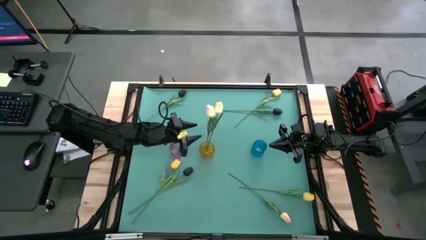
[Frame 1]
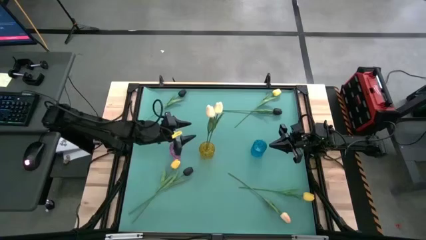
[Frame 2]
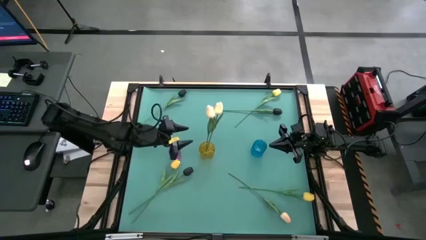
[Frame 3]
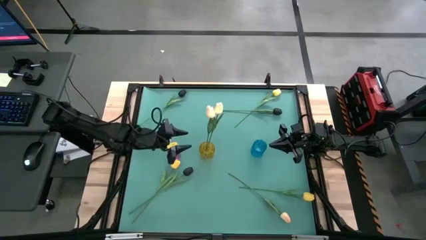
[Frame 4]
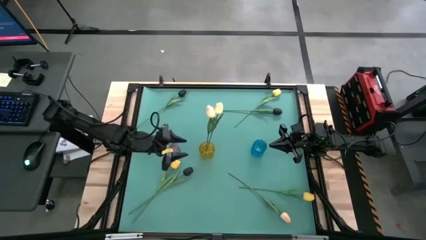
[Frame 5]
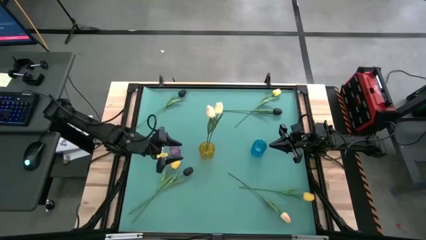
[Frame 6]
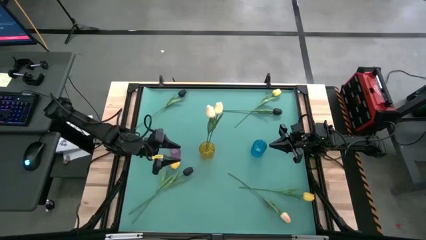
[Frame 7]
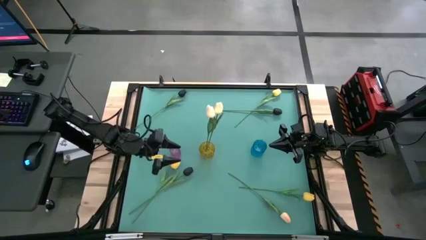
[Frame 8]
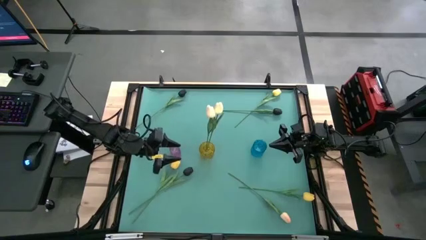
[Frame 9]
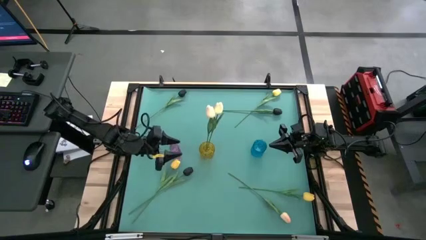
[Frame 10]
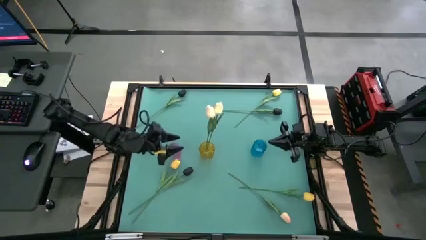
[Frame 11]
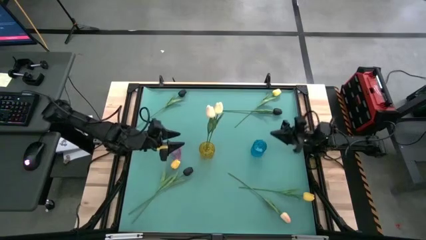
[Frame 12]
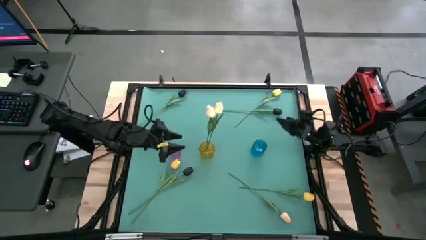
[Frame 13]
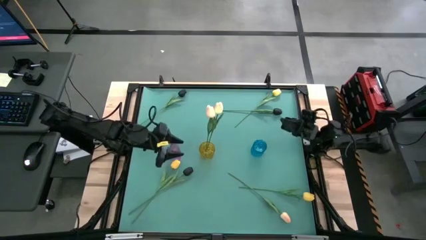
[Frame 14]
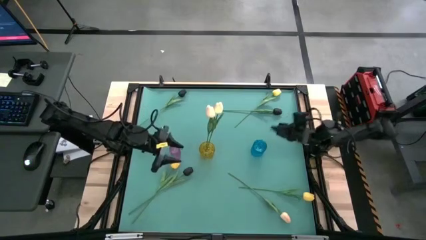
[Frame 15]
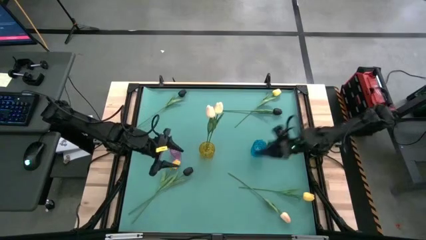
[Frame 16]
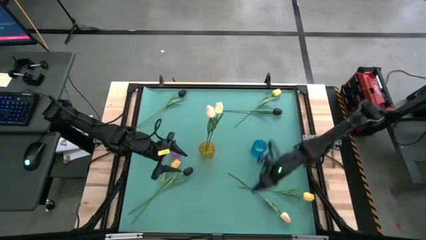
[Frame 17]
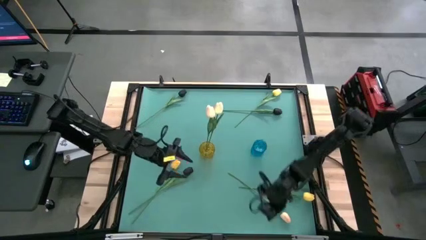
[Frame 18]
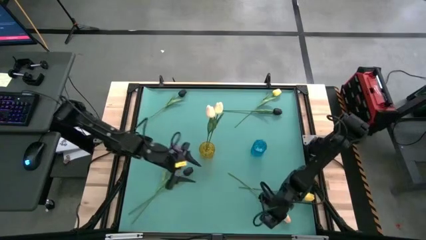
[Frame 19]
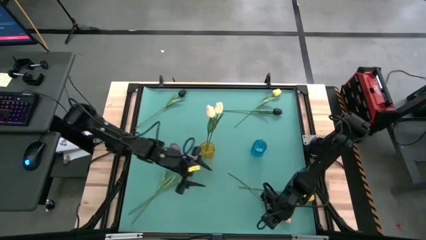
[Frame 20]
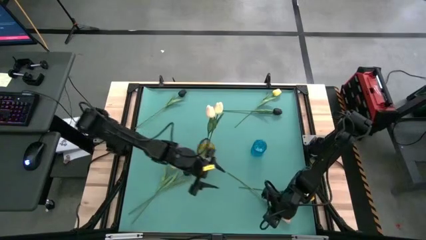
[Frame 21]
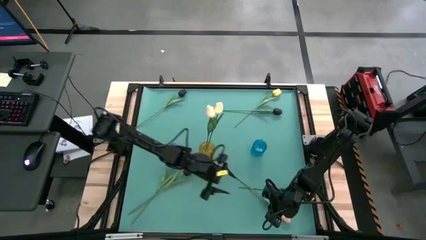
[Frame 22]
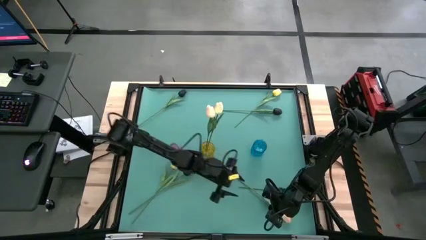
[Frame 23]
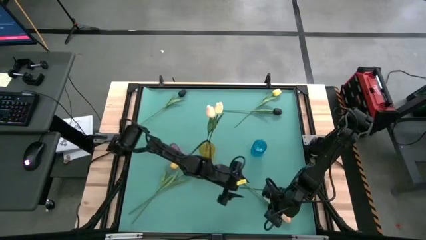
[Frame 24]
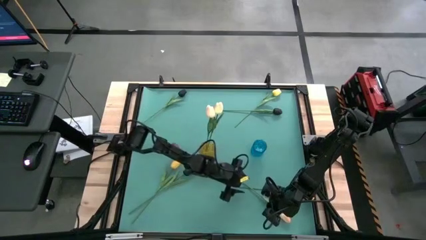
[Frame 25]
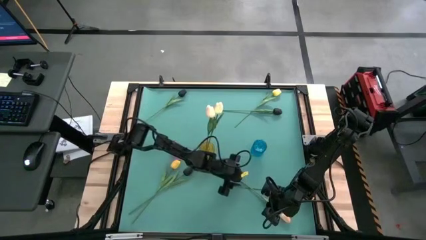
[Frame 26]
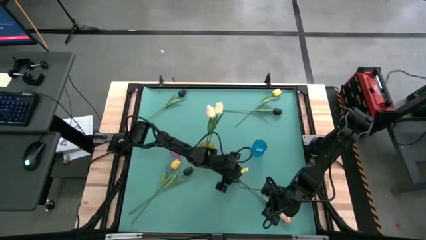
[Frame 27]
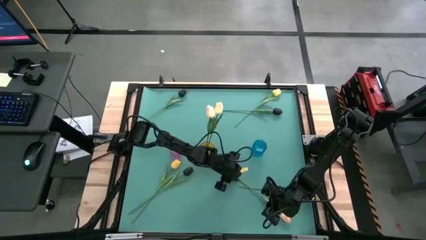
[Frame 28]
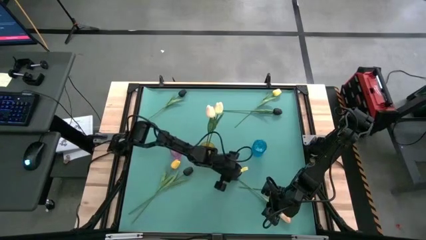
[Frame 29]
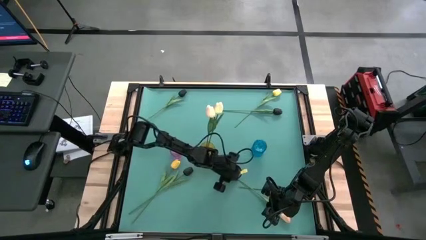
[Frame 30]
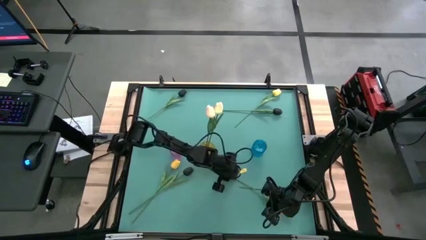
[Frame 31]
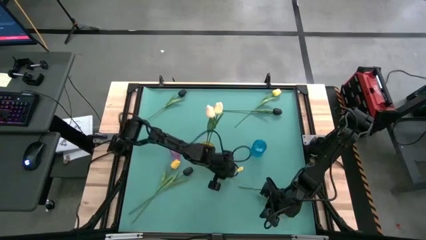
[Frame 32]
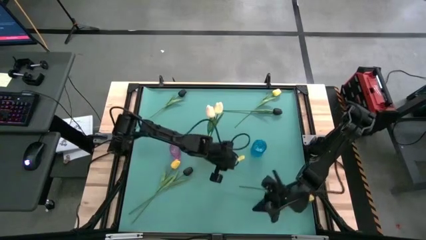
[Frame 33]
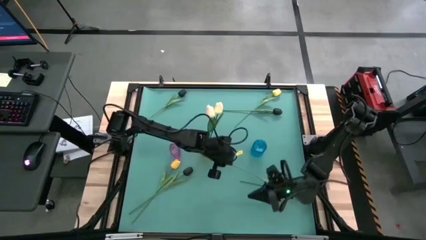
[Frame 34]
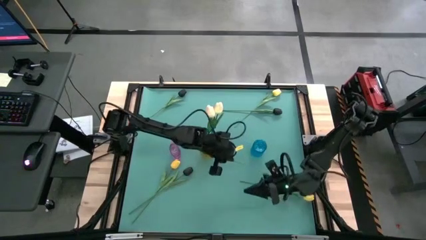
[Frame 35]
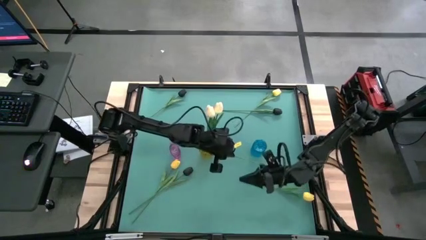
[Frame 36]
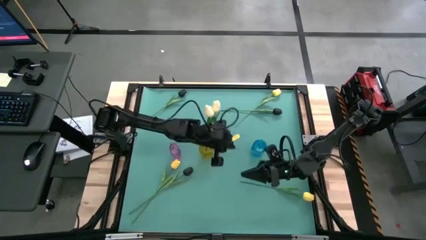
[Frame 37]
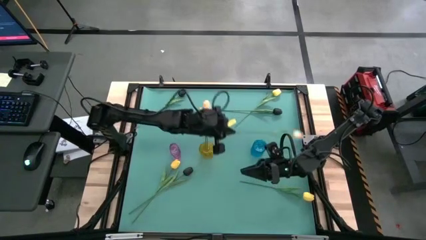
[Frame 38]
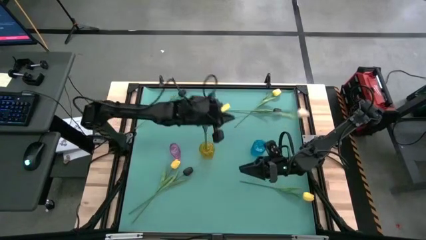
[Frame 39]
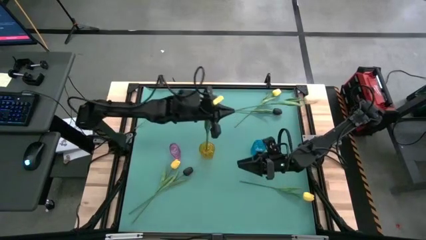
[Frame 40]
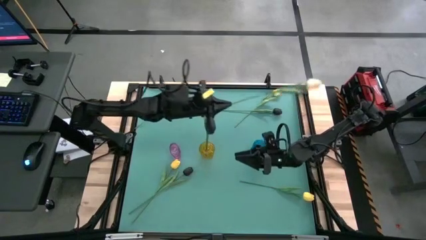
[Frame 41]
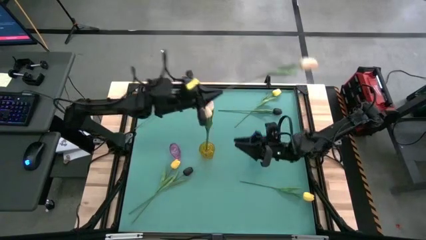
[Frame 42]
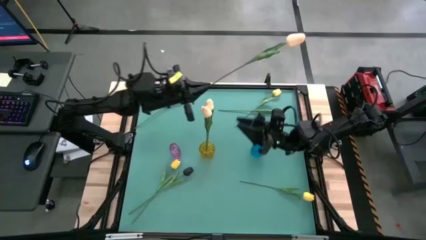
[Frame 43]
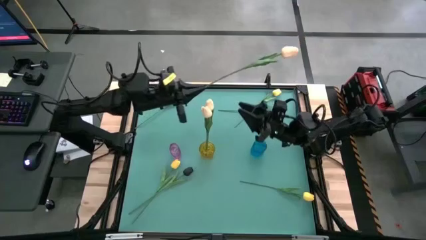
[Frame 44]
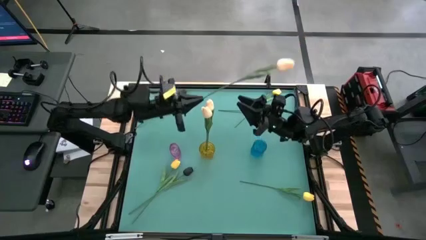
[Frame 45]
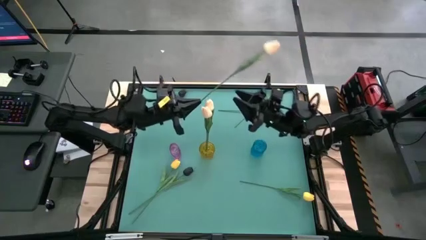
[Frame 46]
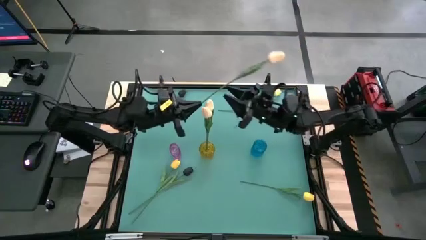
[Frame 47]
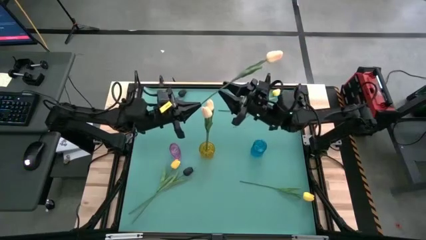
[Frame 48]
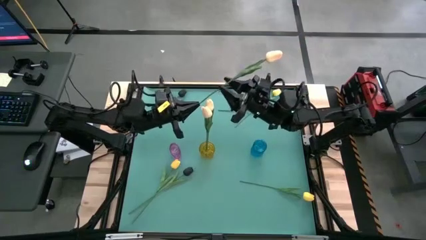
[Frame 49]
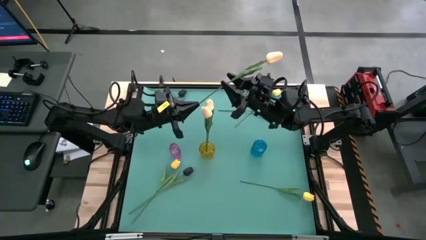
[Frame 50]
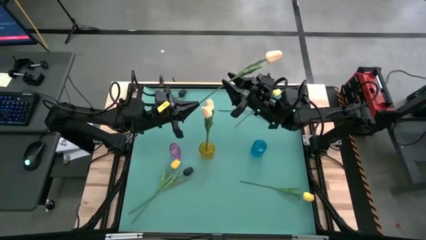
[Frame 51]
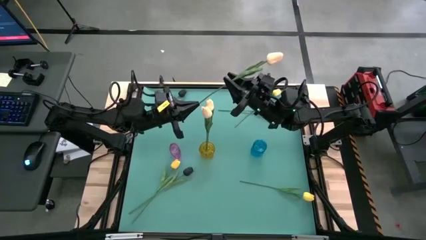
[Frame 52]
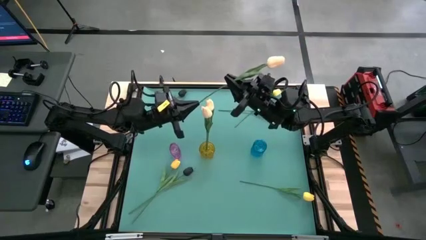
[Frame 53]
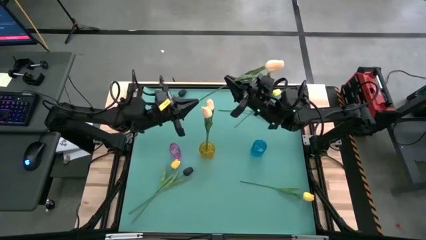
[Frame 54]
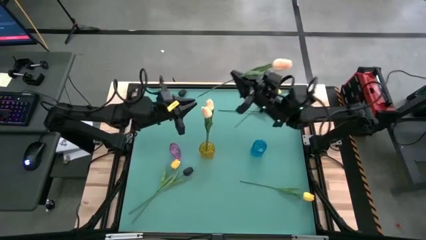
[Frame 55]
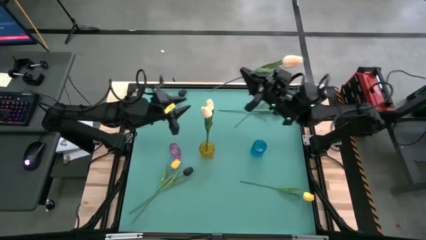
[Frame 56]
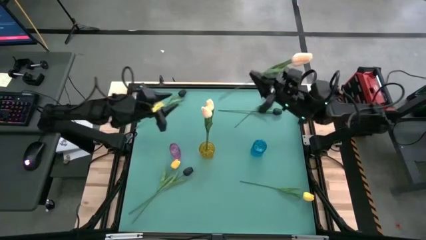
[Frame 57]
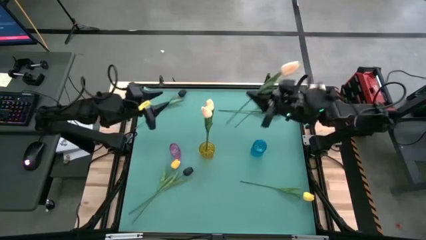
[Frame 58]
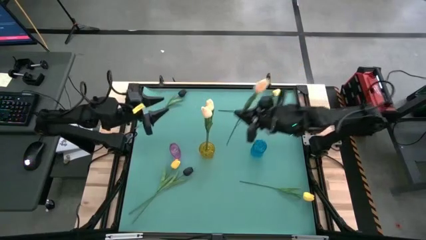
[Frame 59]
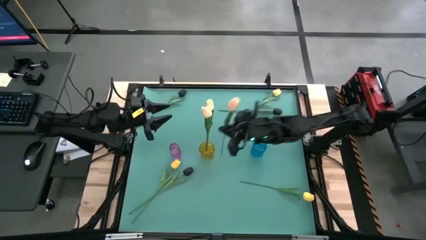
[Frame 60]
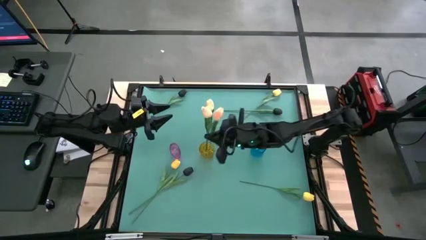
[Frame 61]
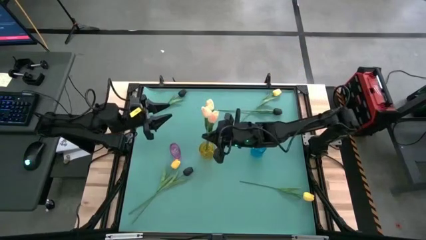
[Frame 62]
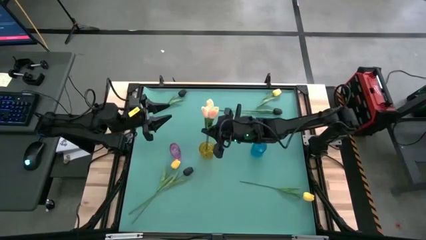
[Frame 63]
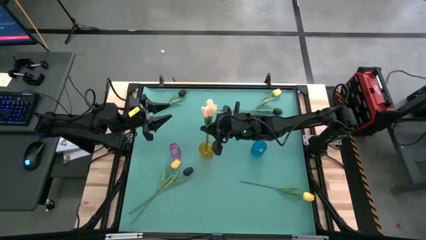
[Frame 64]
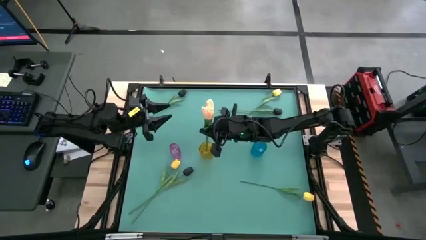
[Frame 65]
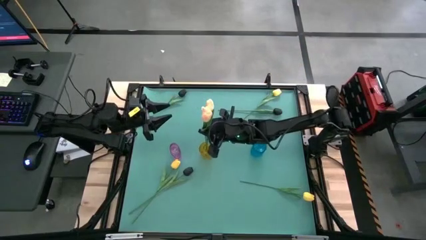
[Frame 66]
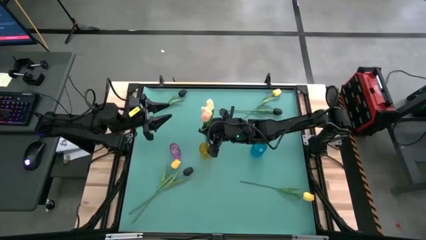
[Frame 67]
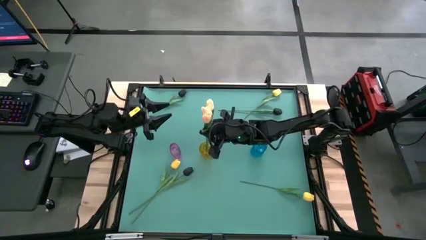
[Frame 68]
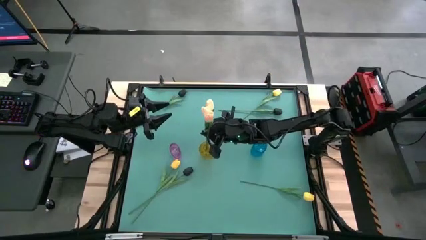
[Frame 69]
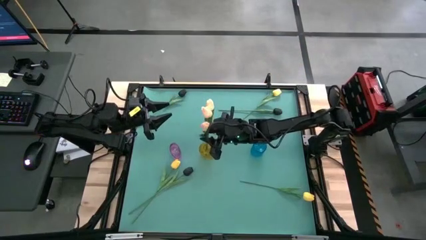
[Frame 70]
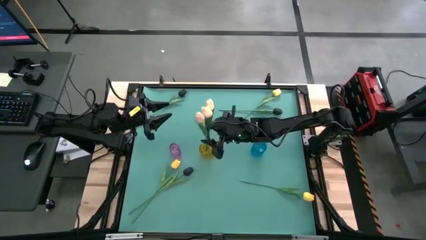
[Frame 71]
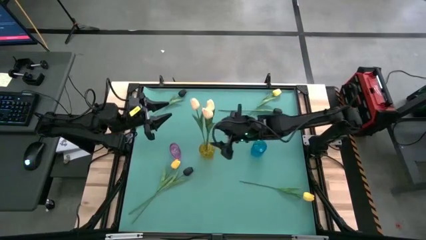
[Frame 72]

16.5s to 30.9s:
Task: Sort flowers into vase by color
Put the white flower into the yellow vase

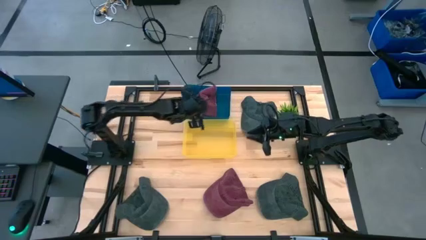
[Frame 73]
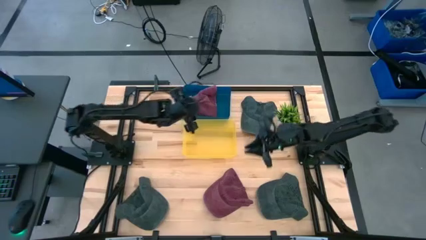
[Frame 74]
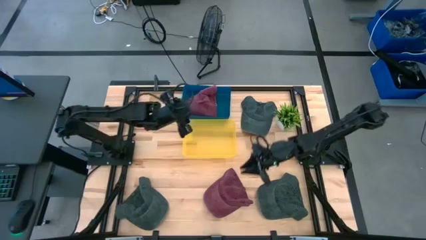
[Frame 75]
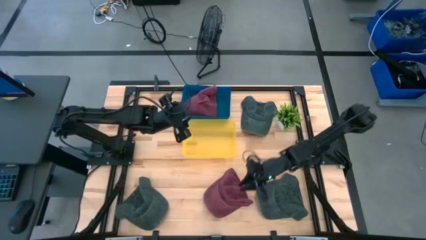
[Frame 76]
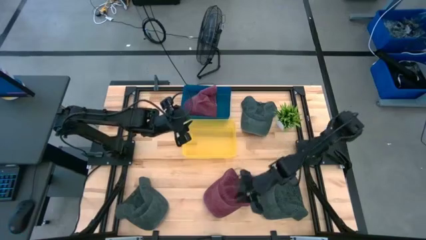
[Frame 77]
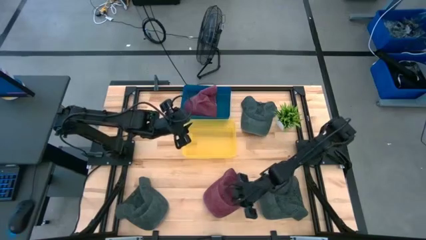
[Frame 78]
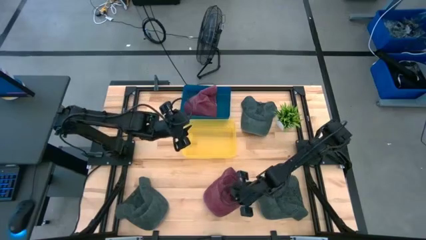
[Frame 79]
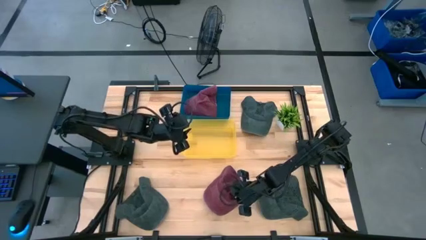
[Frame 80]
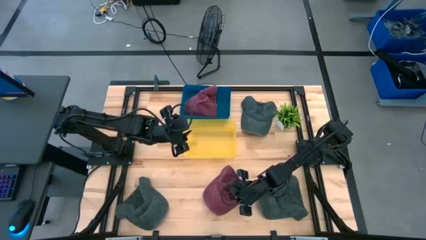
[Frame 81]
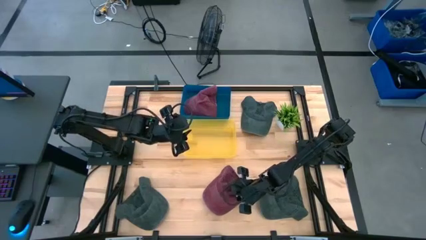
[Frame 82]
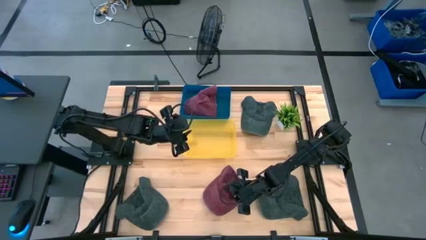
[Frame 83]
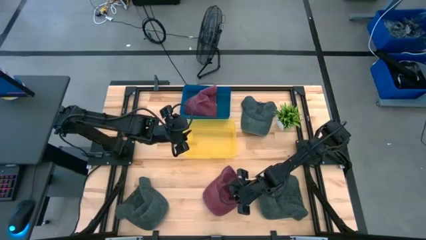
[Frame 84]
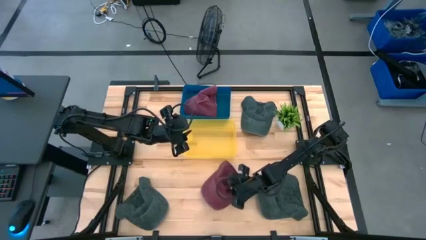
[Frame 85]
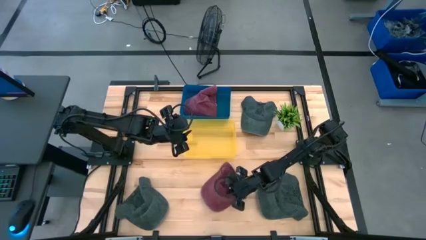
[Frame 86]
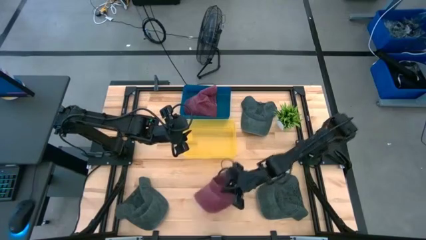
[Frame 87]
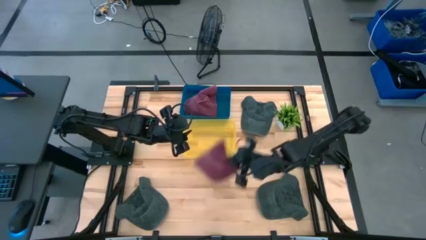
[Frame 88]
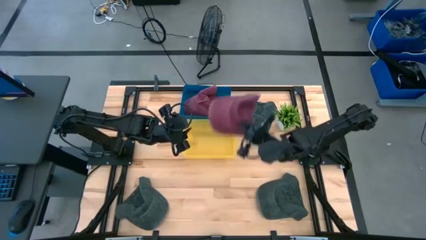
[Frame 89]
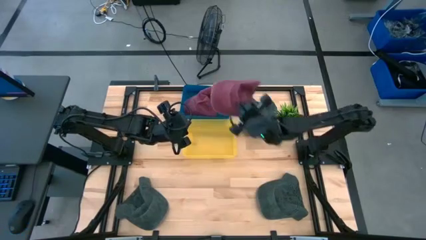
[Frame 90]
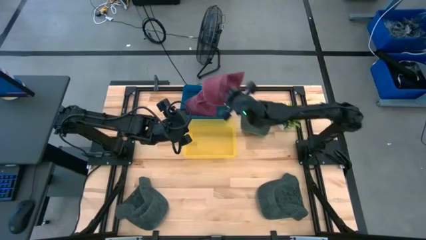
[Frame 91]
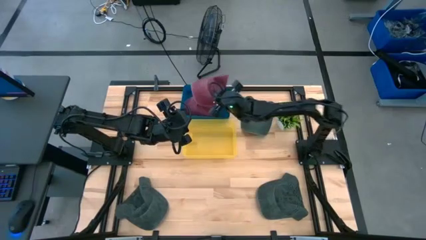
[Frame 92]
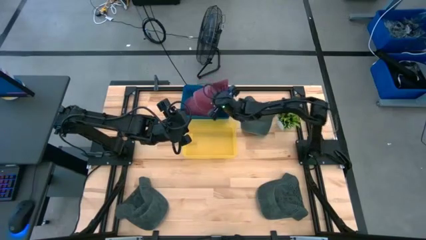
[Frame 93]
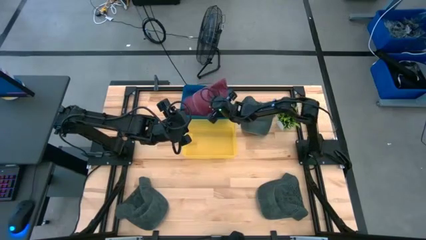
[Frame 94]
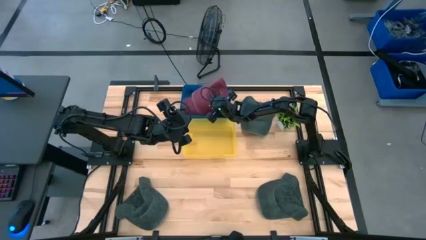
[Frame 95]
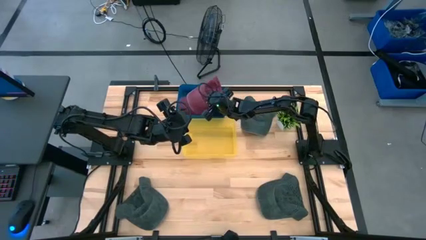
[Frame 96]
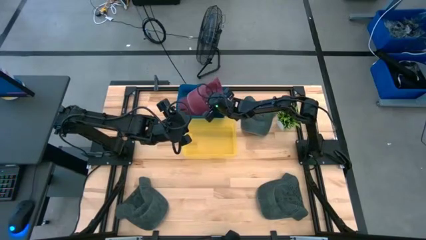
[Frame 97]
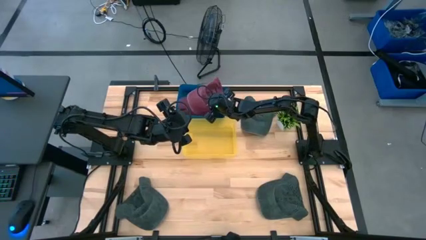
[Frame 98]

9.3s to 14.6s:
Task: Pick & Place hat
Put the red cap into the blue bin
